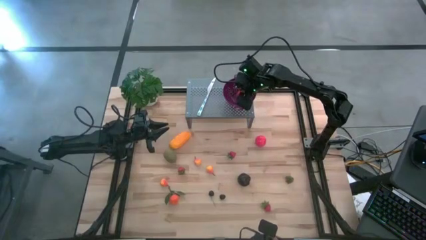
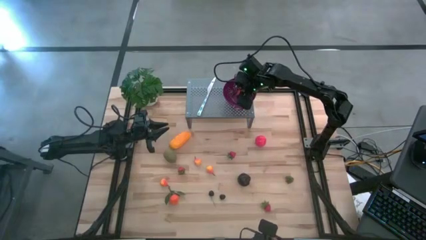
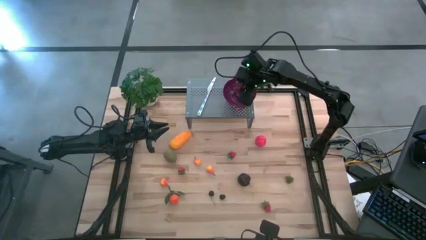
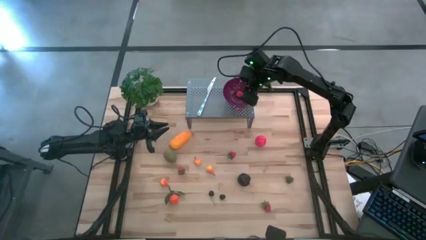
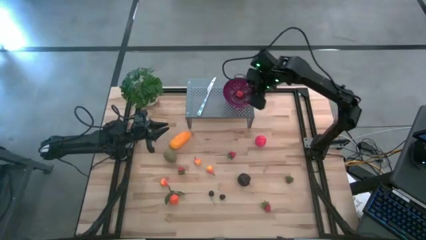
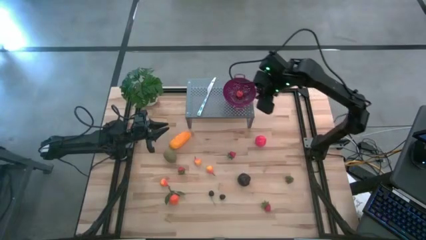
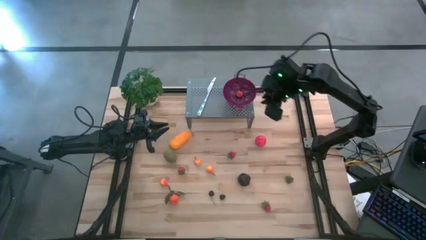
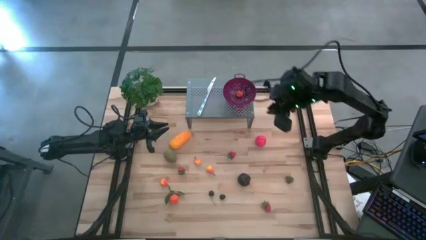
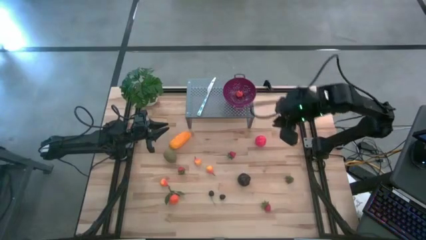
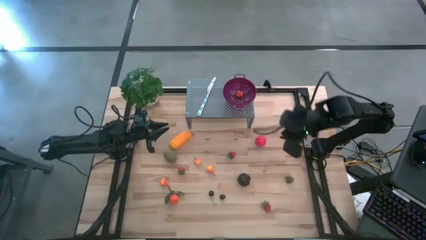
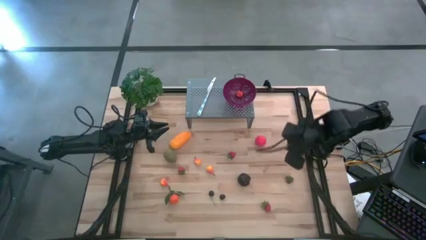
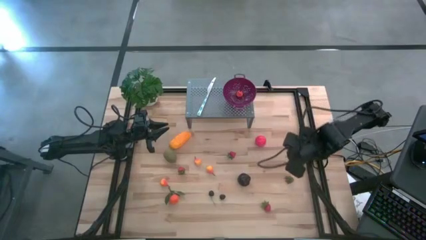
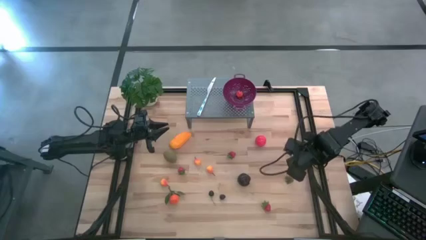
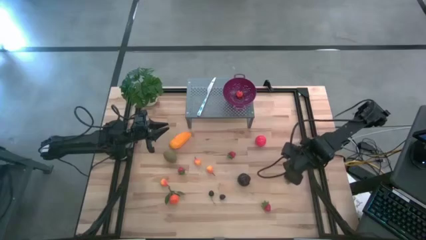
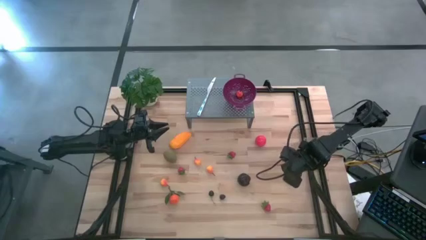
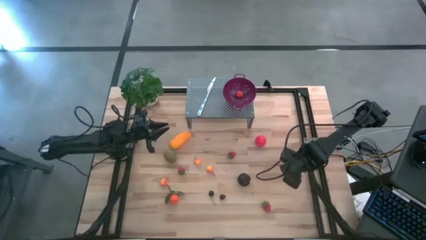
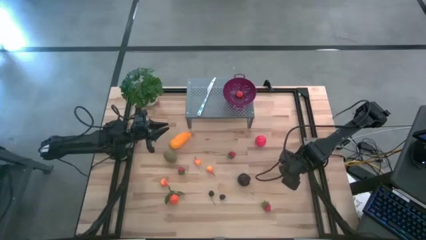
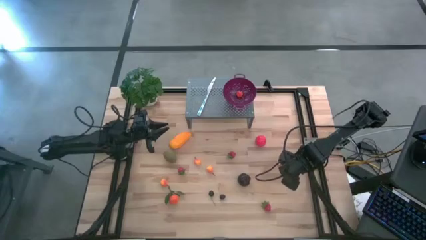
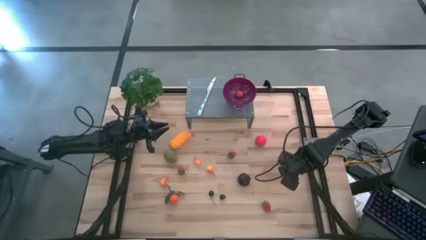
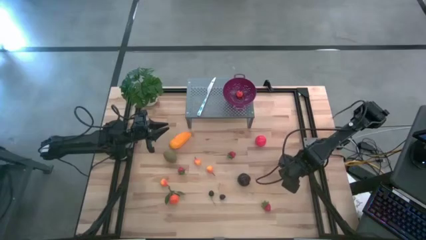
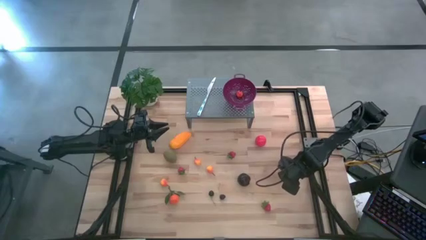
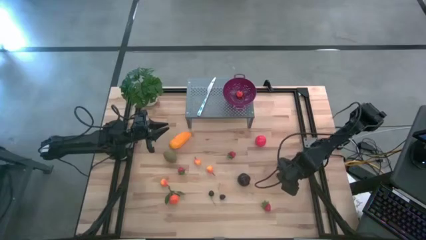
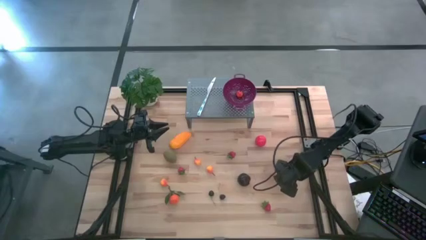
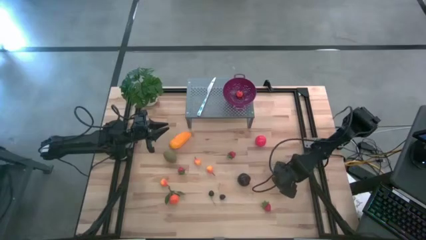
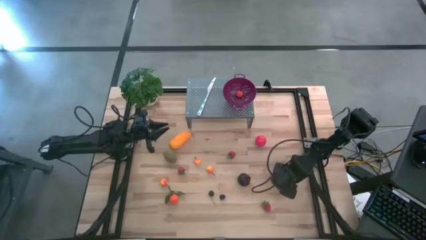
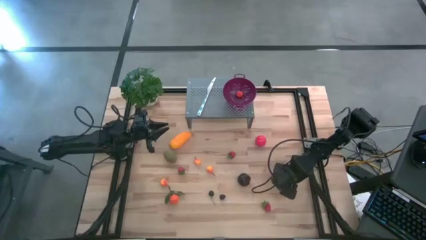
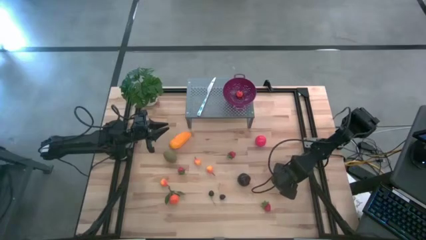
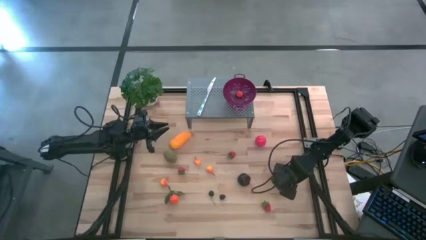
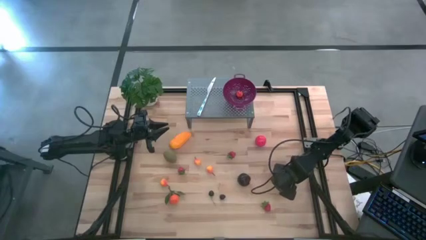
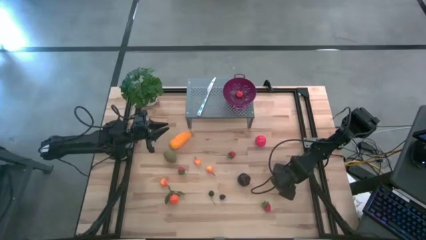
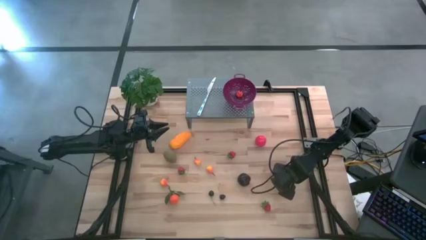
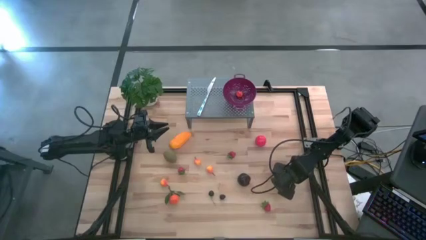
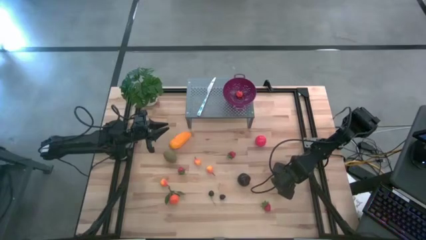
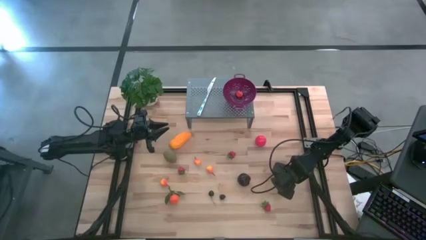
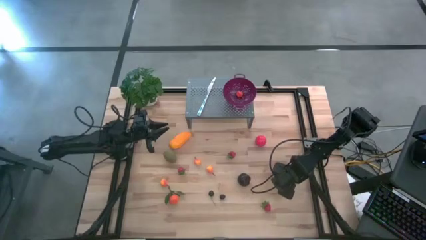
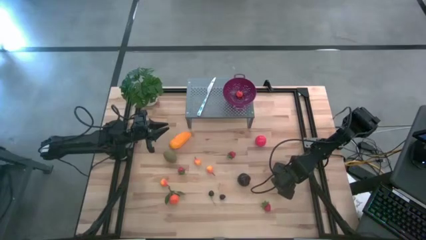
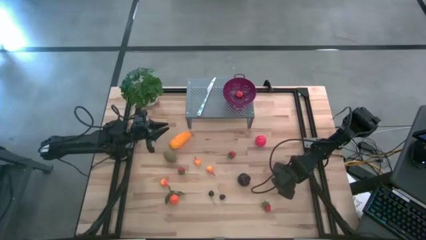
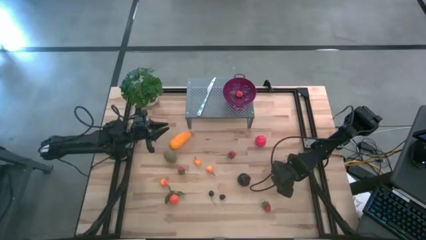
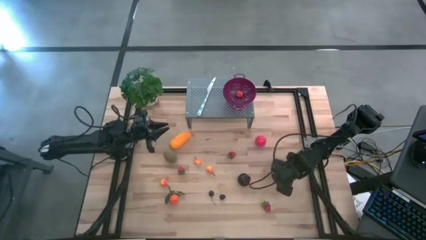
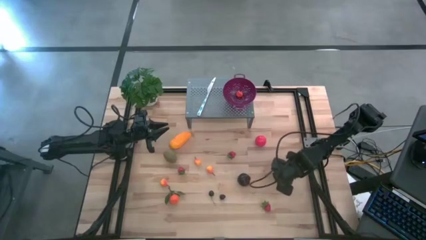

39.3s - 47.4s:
Task: Pick & Place Fruit
Put the red strawberry into the violet strainer bowl on the shelf

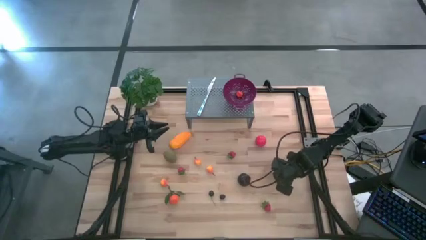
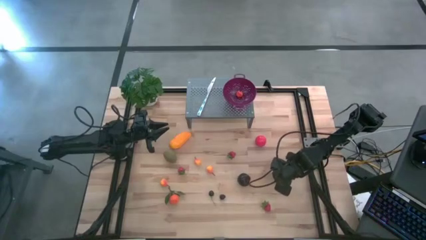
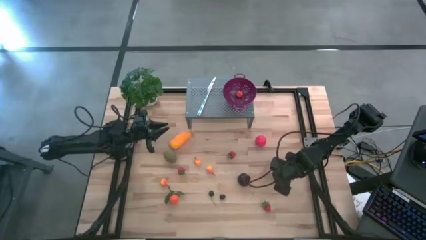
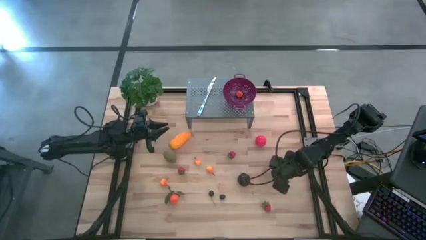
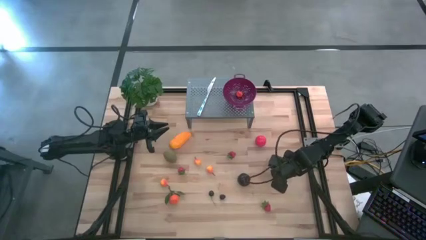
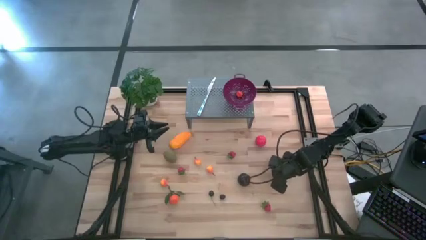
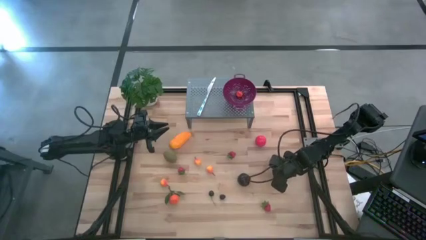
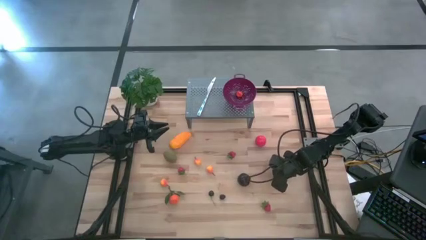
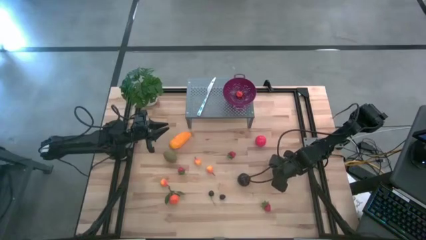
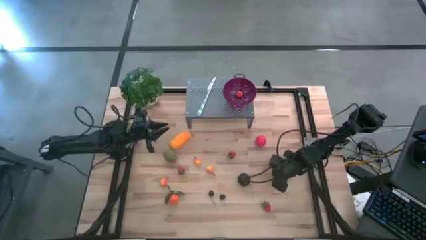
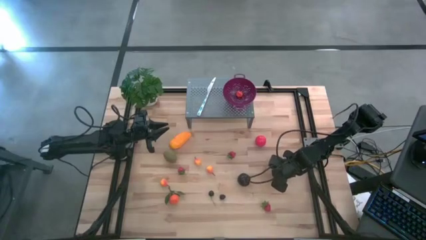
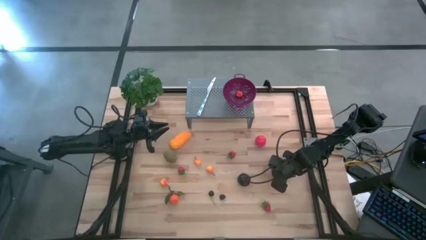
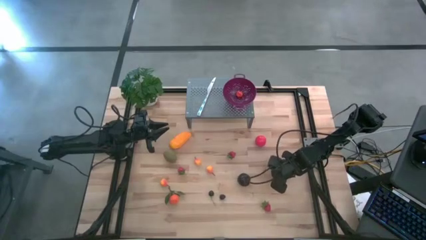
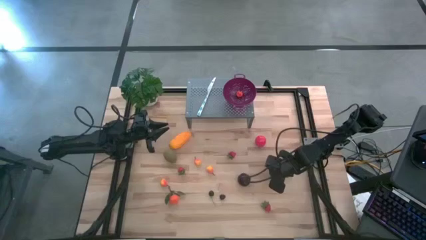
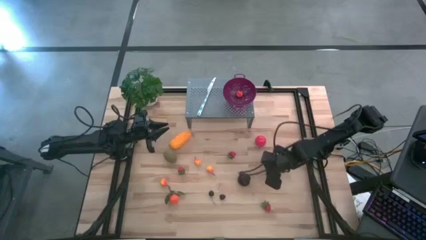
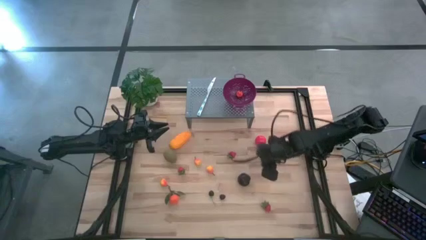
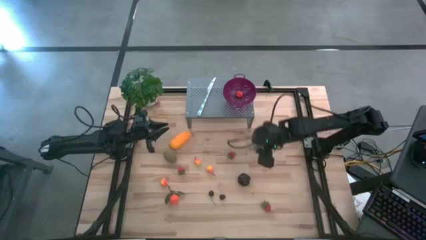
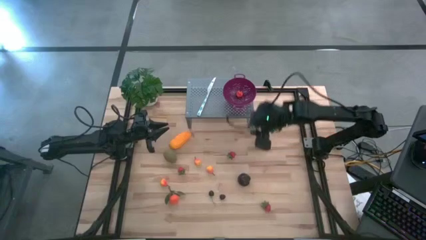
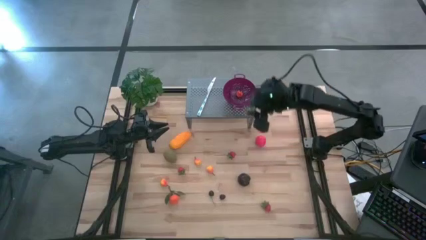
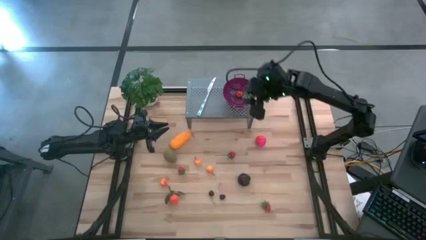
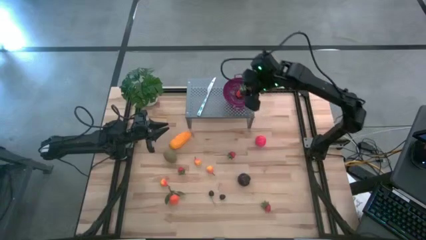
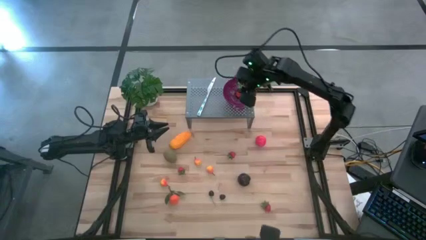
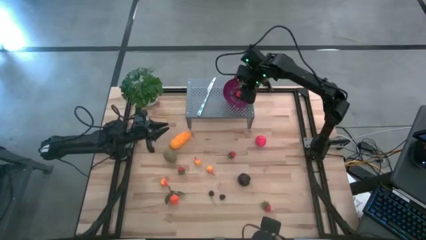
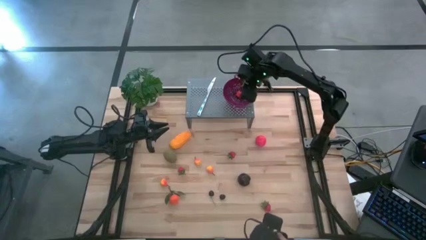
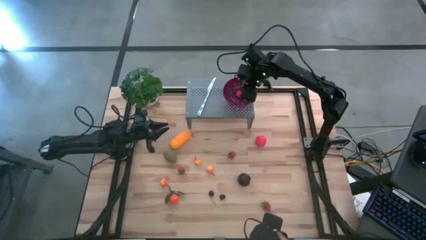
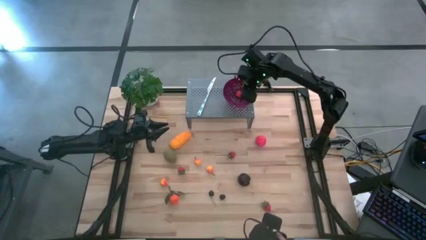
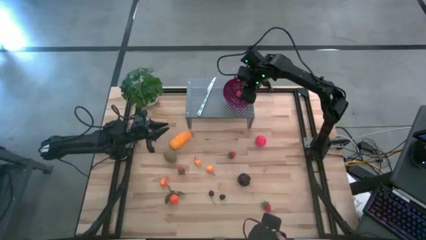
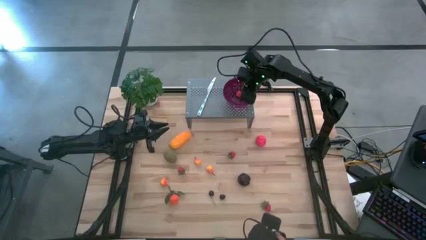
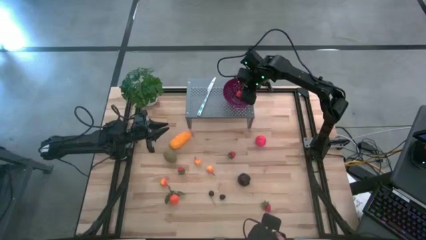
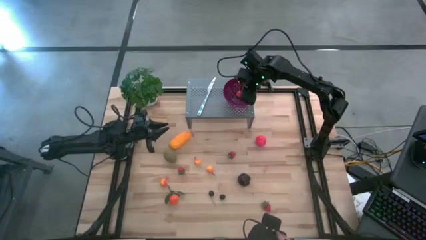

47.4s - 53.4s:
Put the red strawberry into the violet strainer bowl on the shelf
